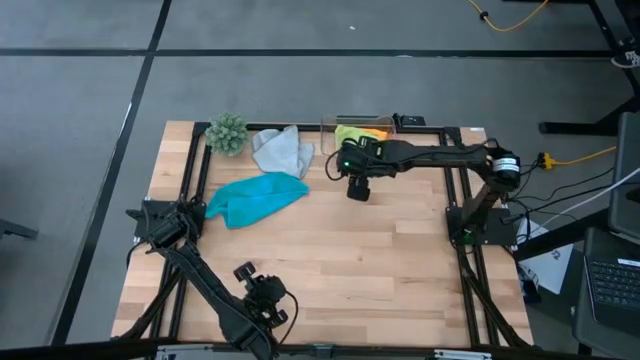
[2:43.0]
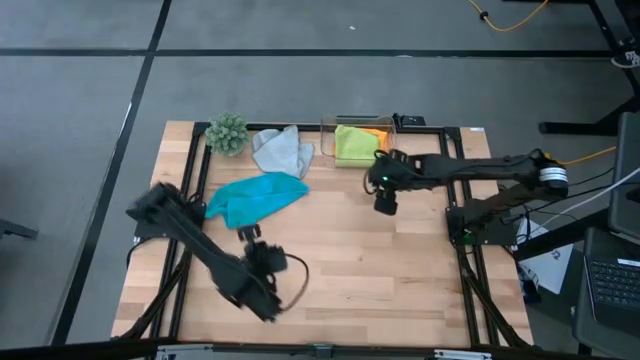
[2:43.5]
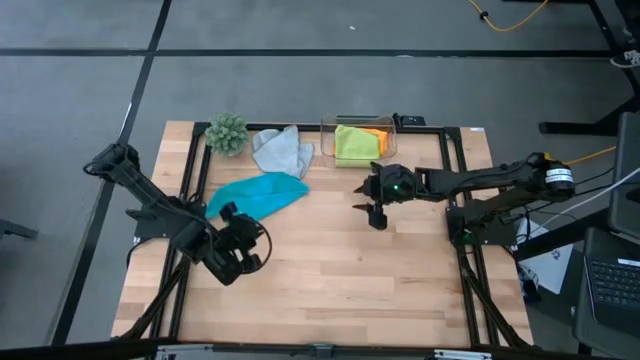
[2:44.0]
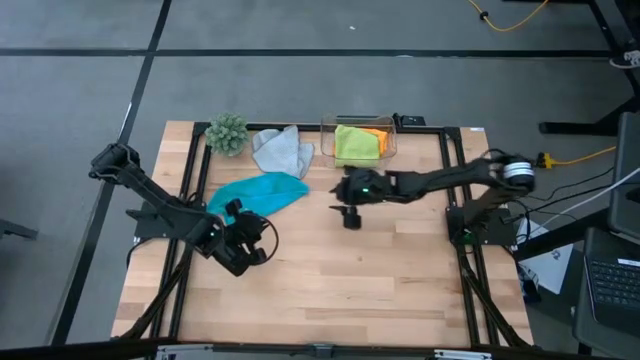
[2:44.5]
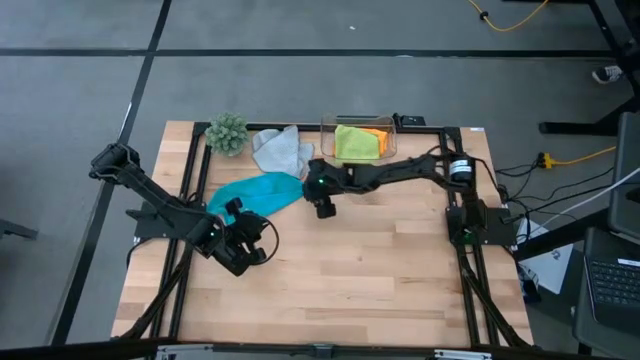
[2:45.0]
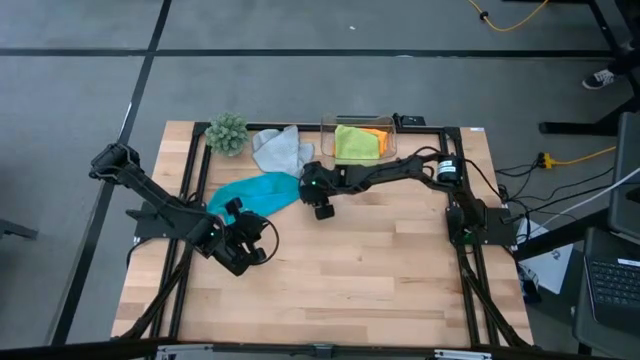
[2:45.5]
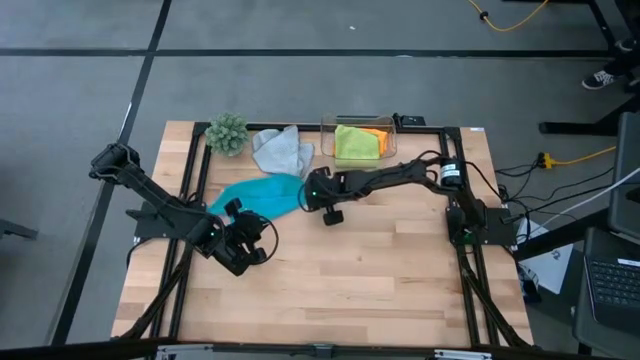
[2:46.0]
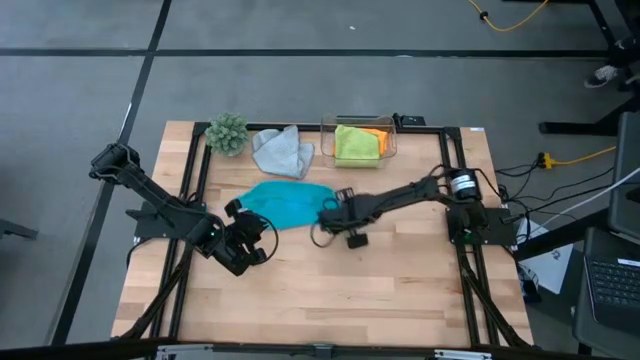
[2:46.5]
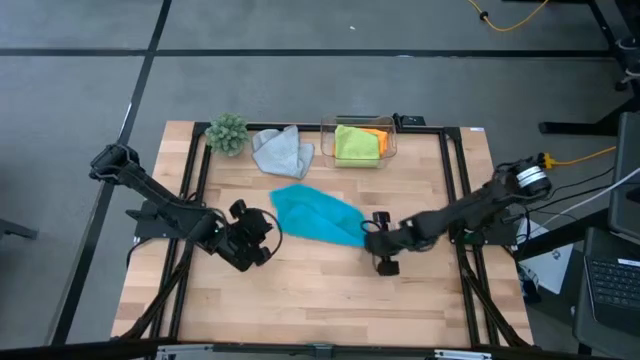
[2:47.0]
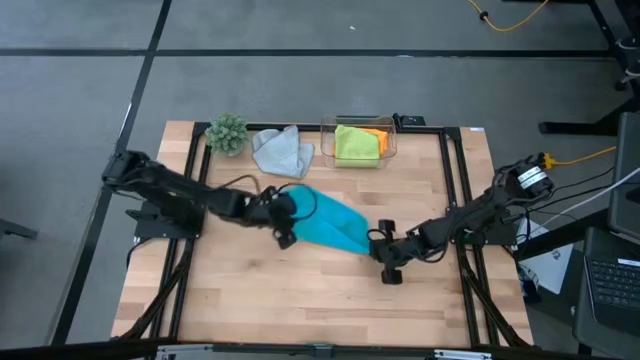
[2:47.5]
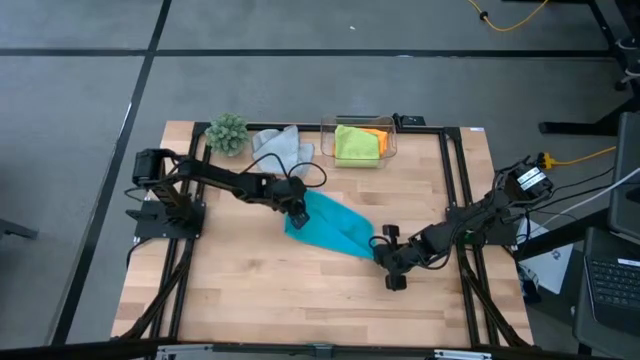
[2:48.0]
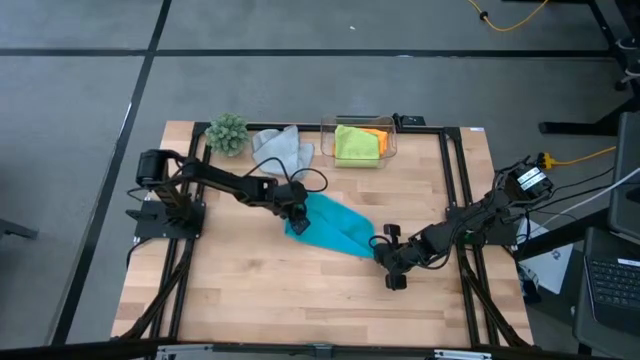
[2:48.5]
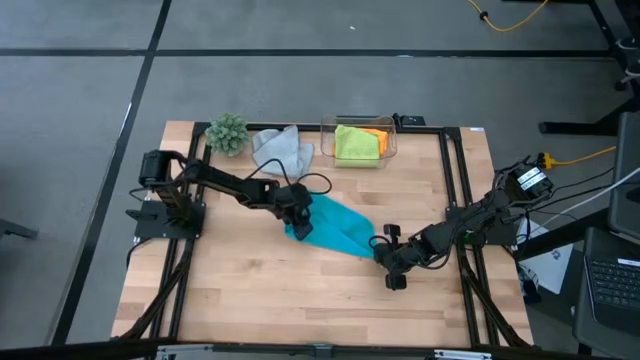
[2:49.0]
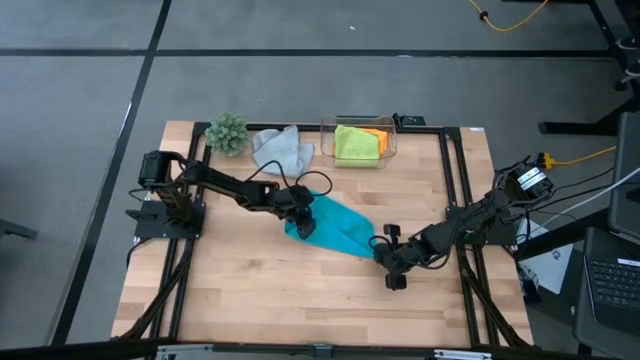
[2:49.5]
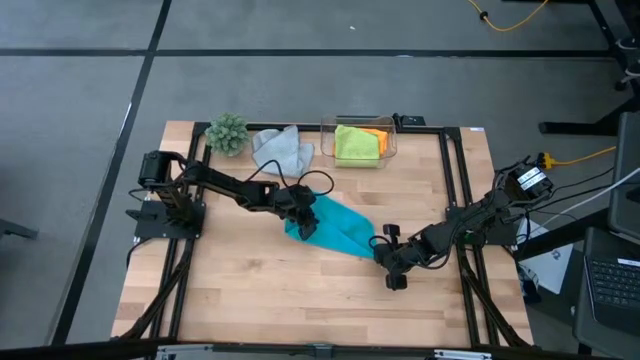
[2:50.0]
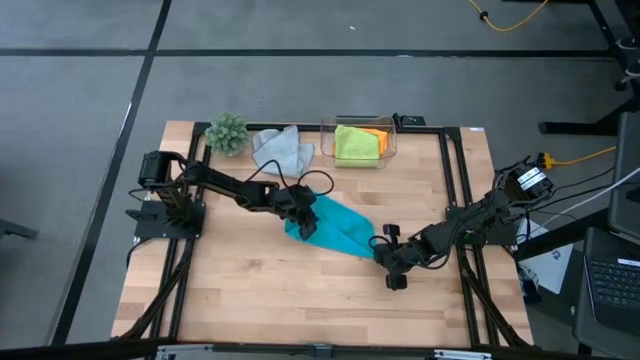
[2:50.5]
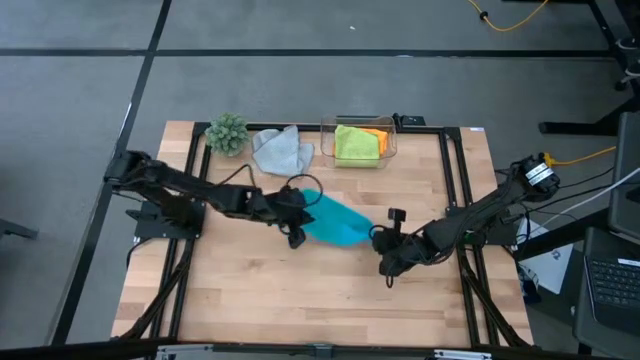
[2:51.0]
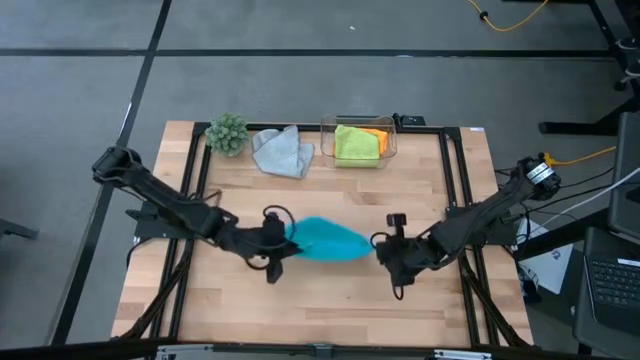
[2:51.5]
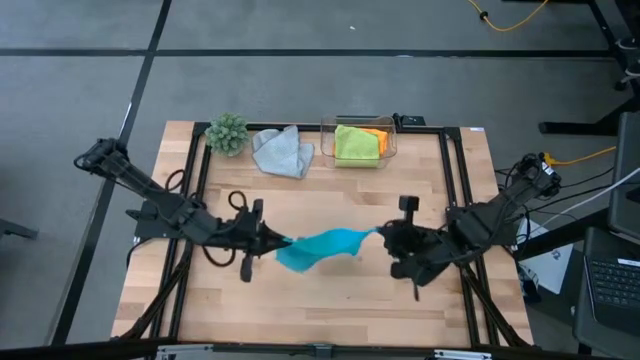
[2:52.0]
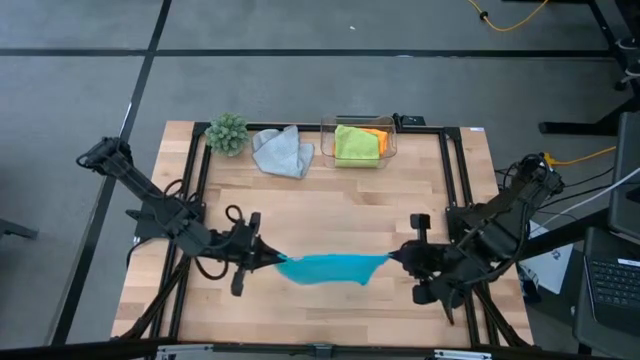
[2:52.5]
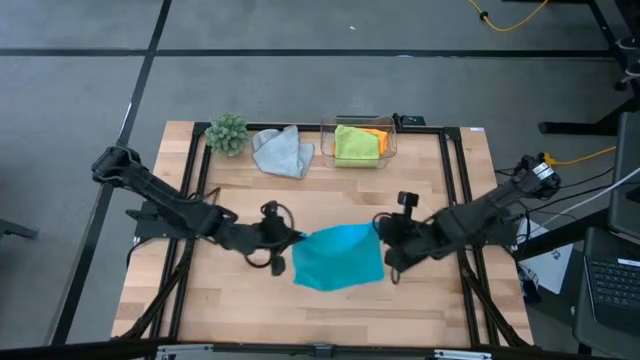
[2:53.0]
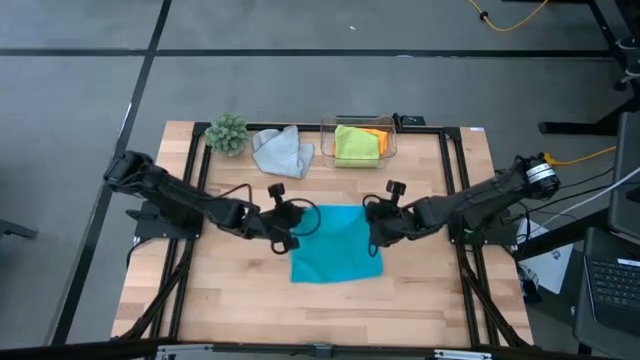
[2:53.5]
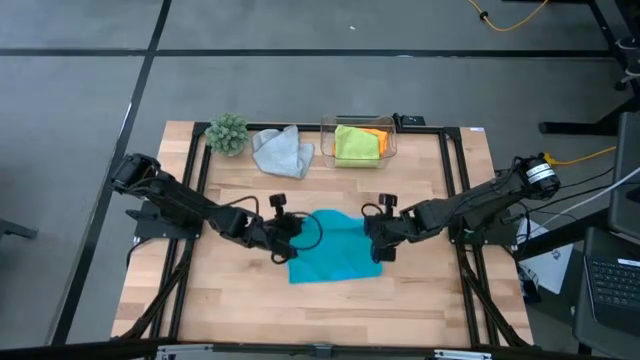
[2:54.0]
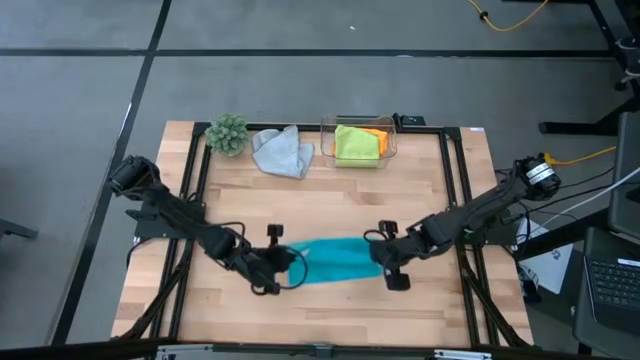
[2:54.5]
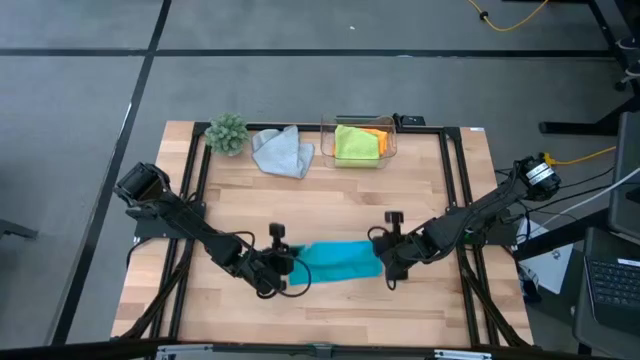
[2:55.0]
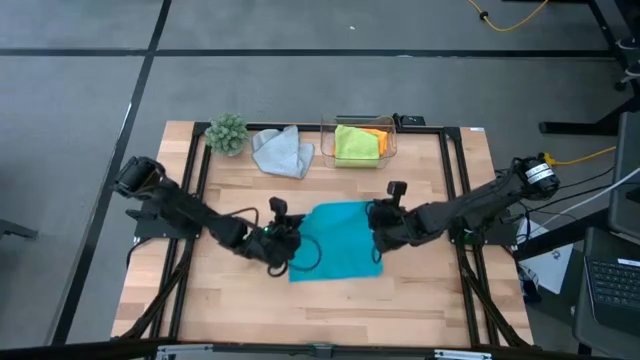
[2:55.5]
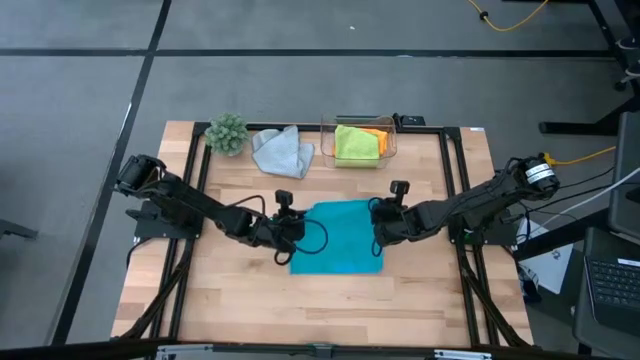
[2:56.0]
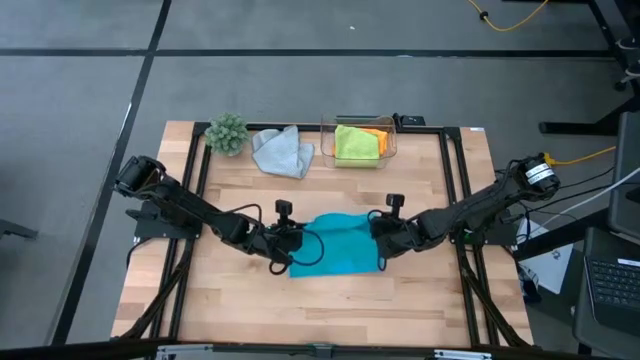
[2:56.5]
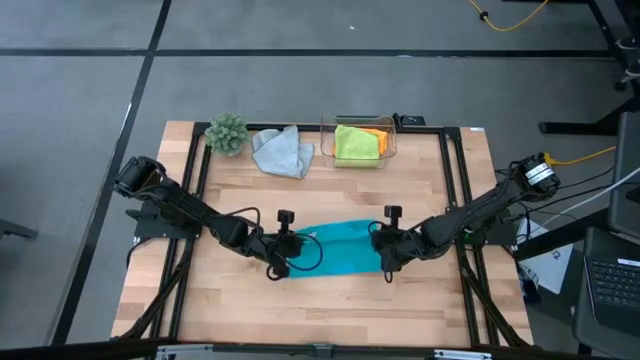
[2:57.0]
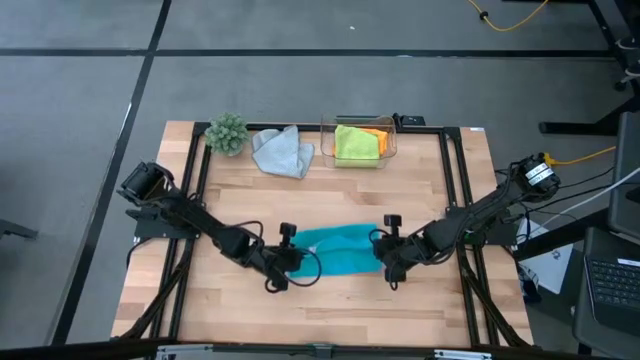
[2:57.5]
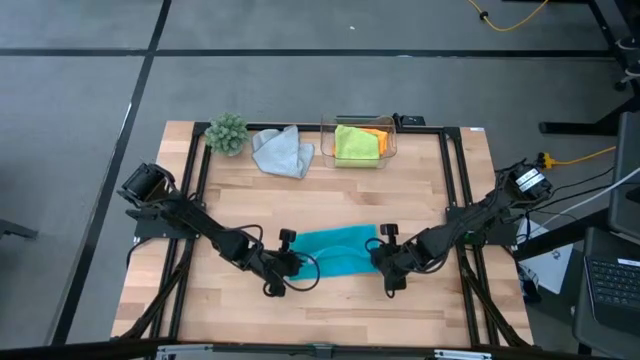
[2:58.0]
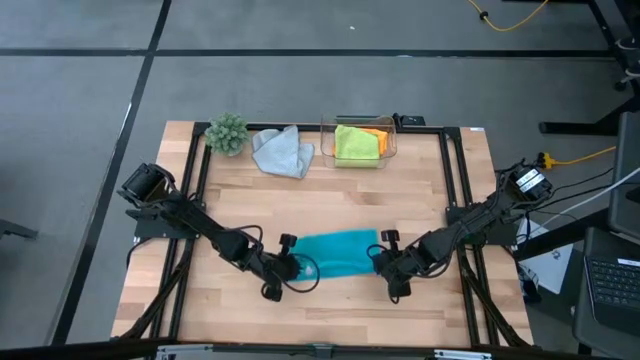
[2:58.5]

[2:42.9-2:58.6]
Task: Fold microfiber towels
Fold the blue microfiber cloth

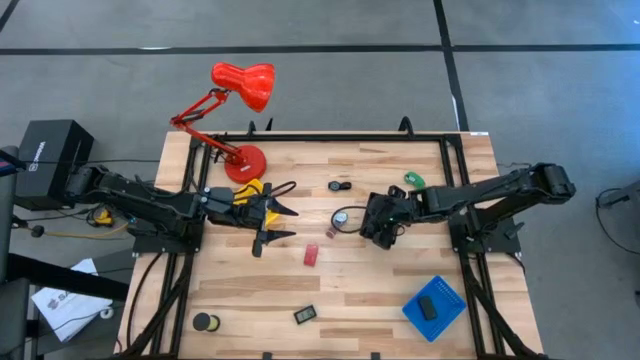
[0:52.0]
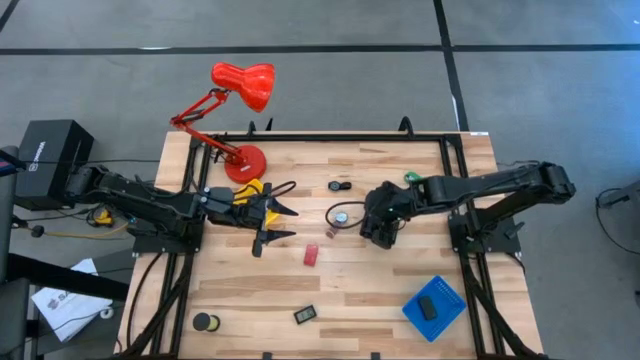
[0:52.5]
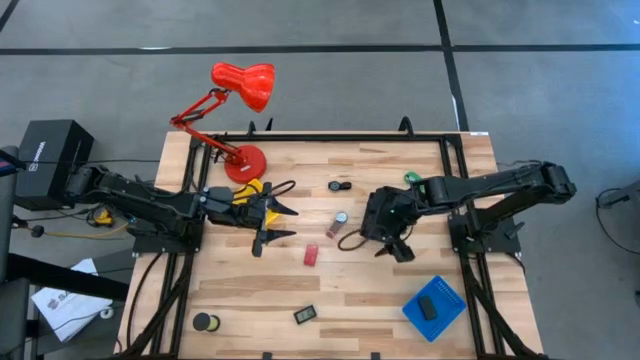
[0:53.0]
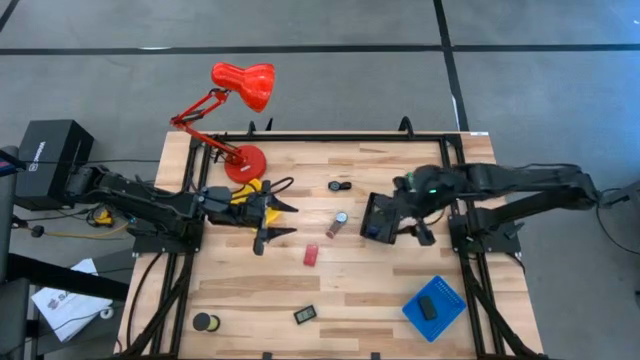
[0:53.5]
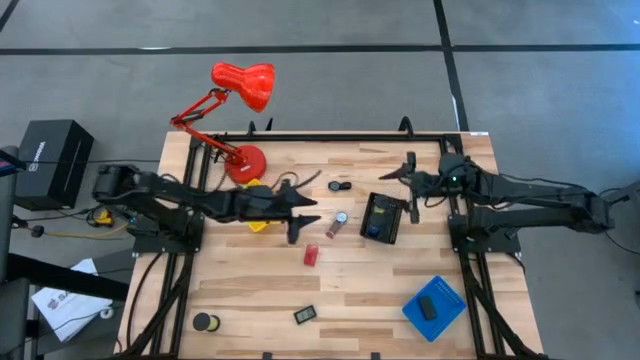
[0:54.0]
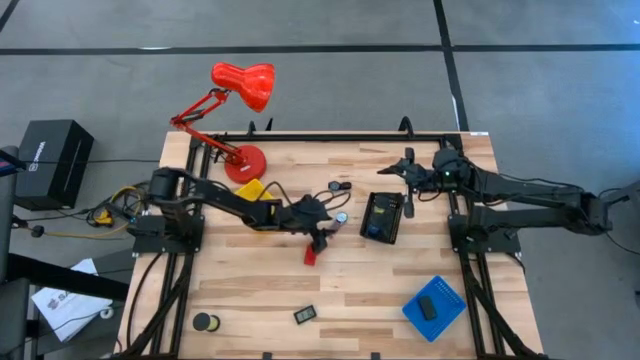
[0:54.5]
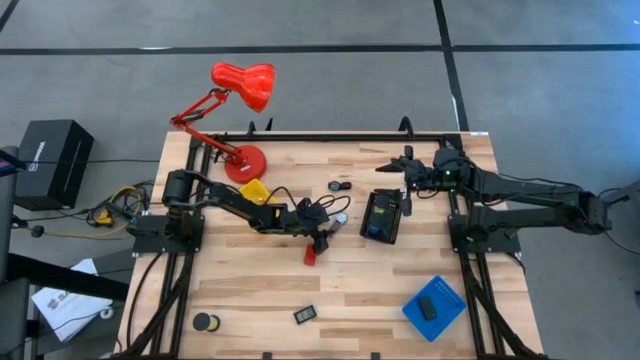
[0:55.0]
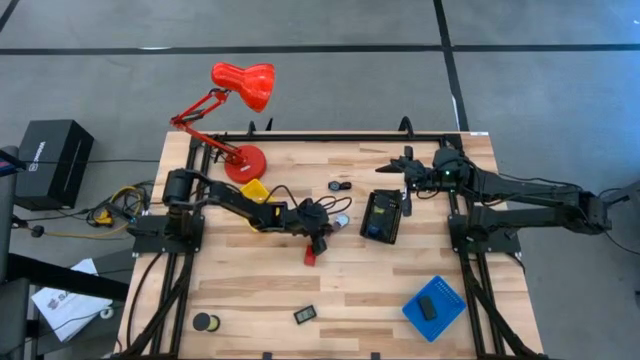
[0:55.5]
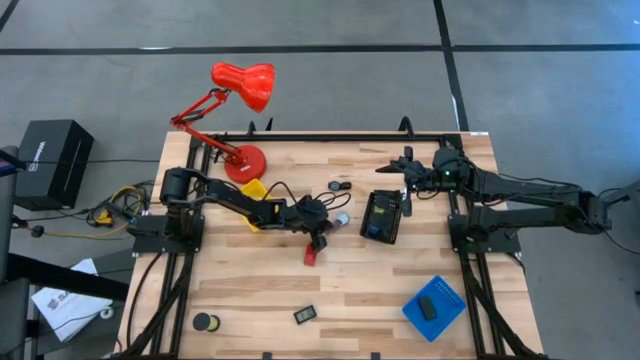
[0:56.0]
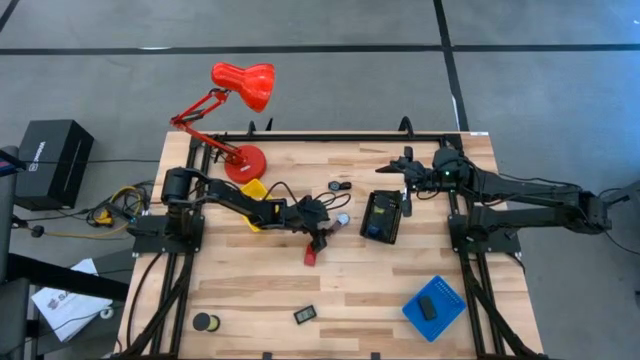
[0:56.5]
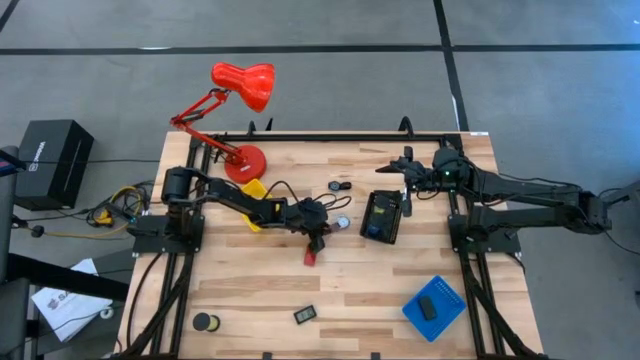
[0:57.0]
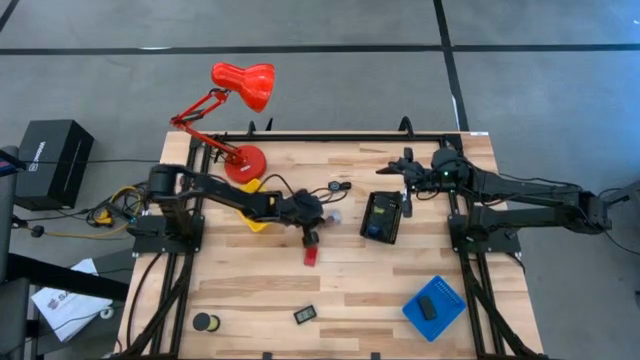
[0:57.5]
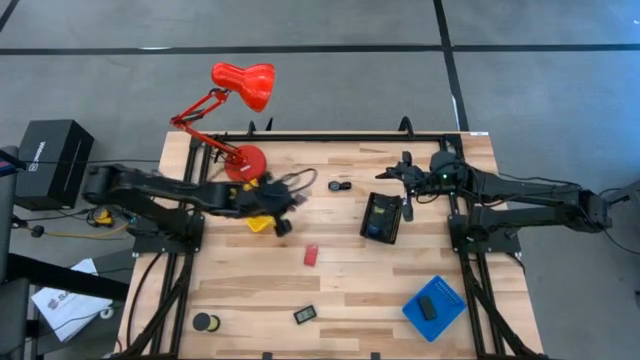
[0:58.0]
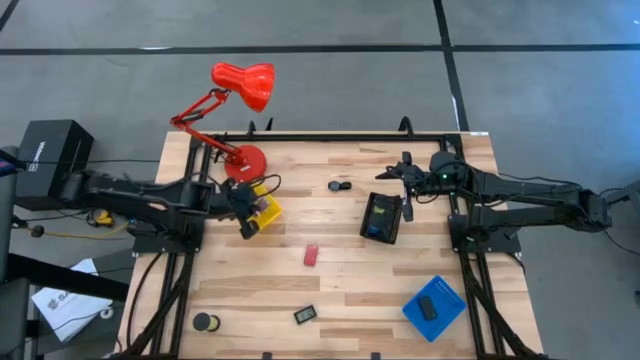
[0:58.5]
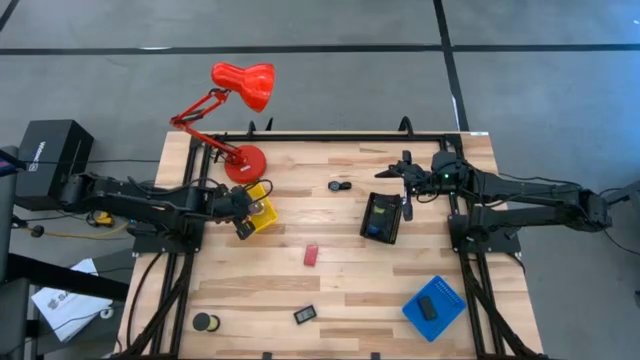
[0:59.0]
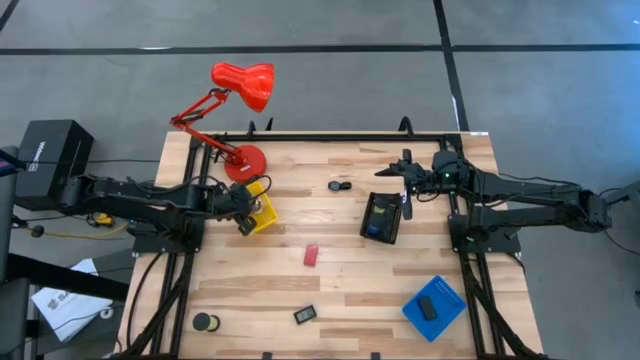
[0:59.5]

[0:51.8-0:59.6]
Task: Pick & Place Office items
Put the brown wristwatch into the yellow bin
